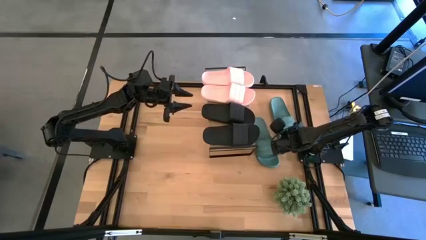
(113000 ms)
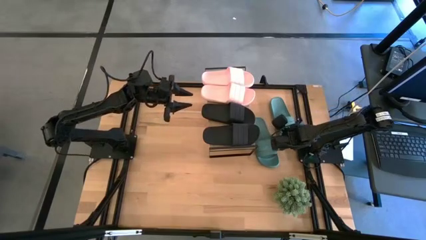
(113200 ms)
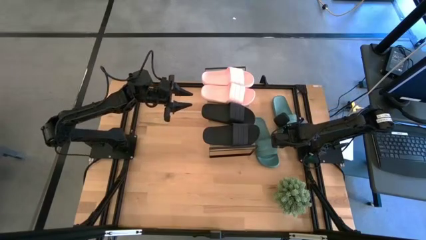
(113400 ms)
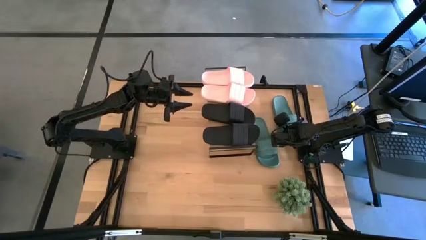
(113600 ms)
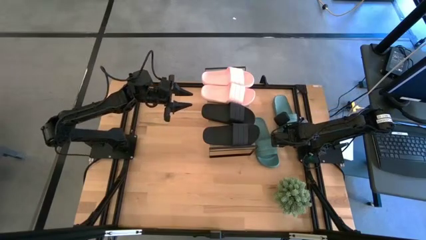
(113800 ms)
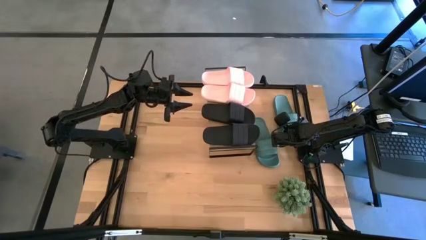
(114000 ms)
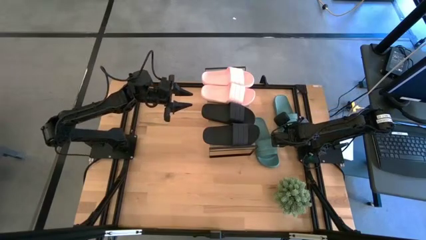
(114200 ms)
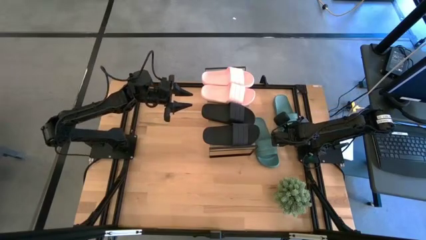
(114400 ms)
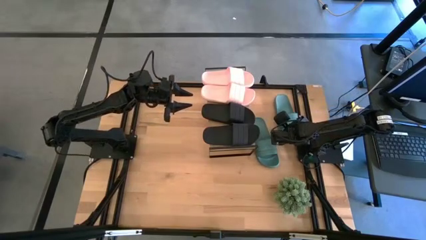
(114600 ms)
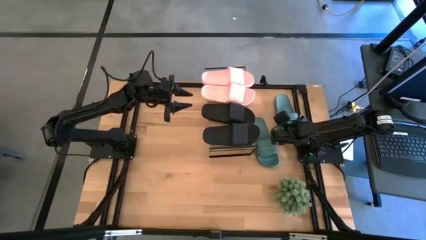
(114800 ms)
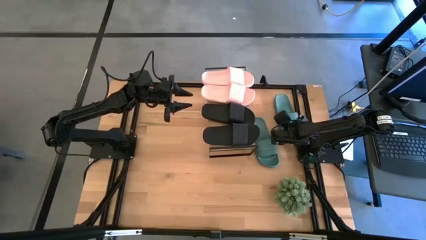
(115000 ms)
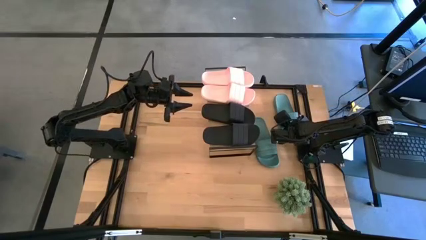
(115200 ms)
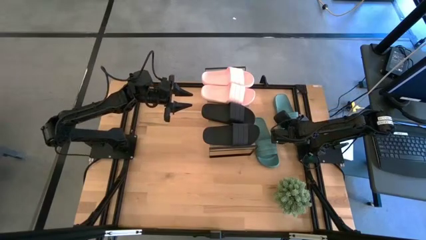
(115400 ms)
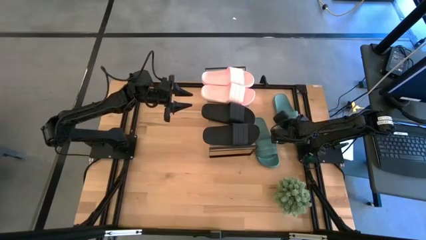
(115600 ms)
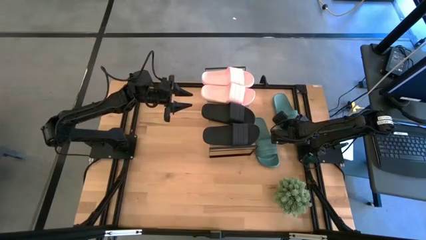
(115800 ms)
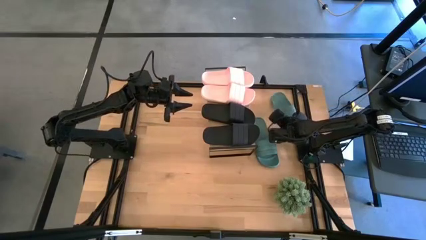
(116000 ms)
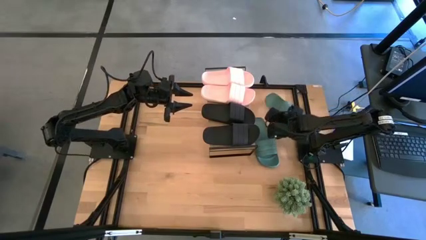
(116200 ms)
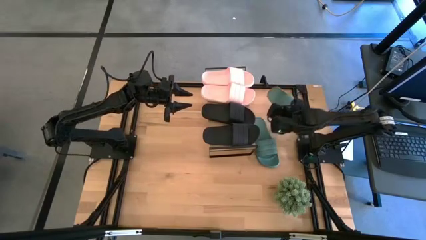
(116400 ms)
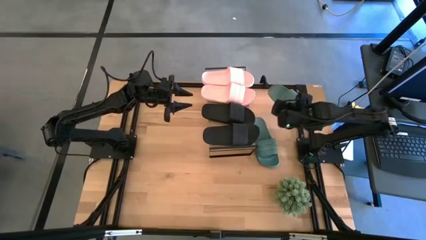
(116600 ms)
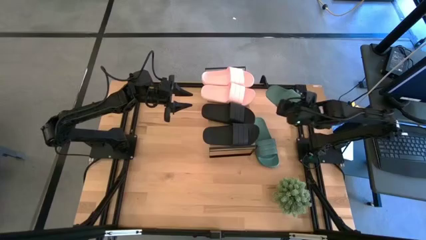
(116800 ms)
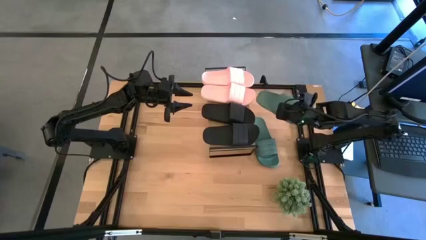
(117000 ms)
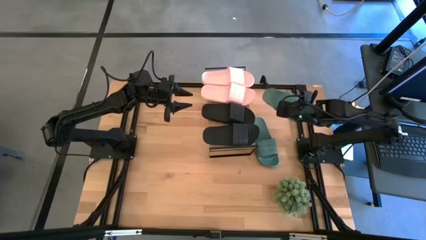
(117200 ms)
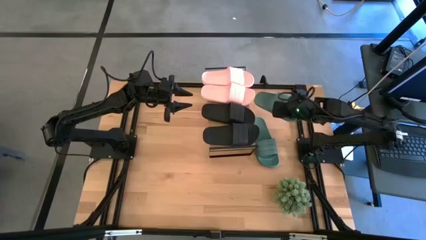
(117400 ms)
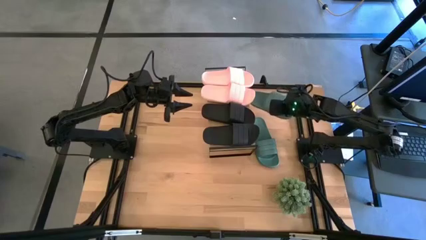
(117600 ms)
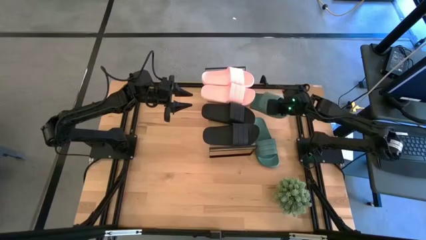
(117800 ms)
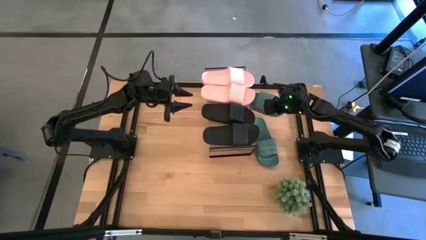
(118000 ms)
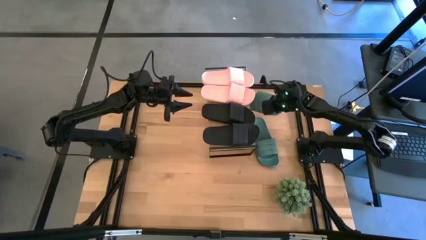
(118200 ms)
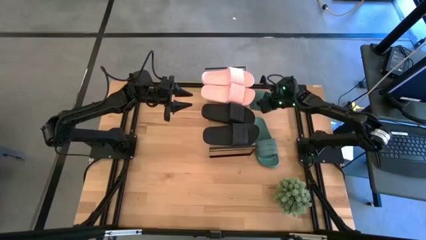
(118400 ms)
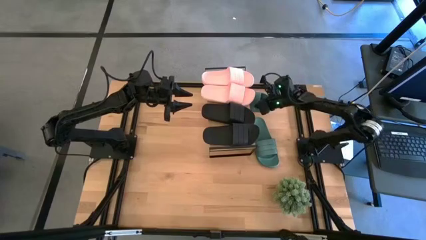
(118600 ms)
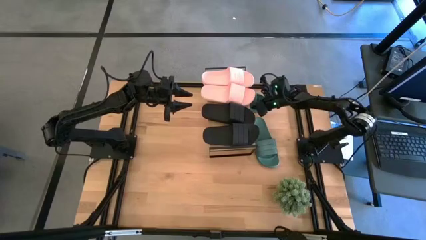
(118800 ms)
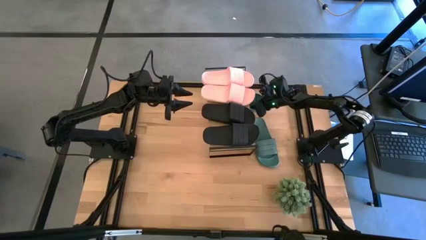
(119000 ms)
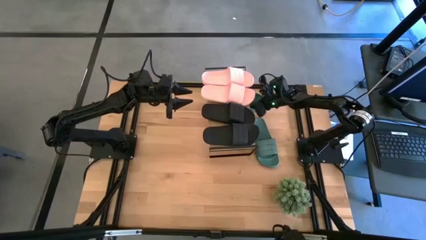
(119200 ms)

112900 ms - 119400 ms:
Task: Pick and place slides into the shelf
Put the right green slide under the shelf

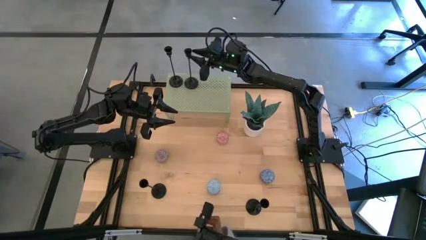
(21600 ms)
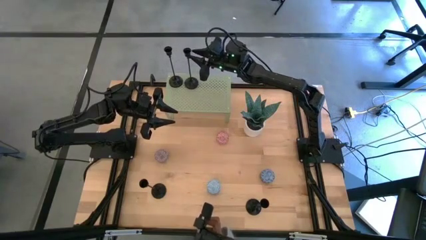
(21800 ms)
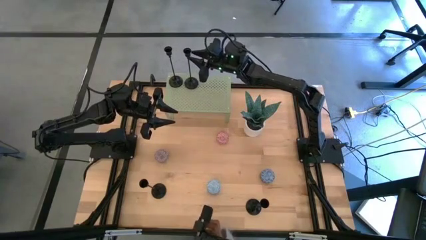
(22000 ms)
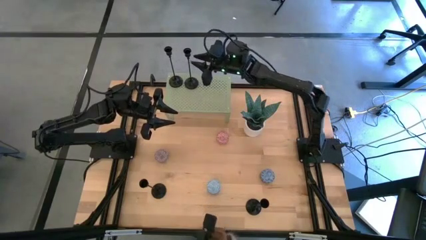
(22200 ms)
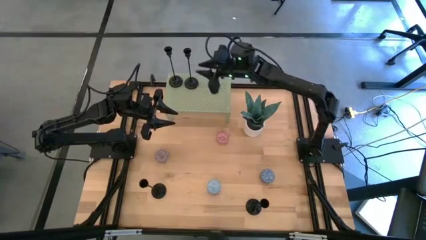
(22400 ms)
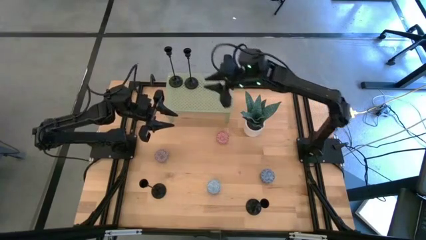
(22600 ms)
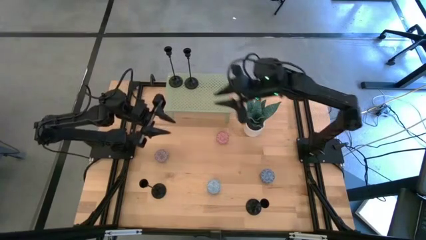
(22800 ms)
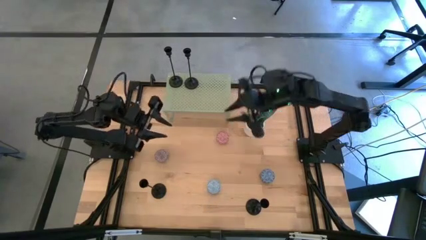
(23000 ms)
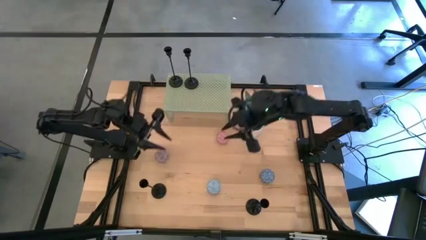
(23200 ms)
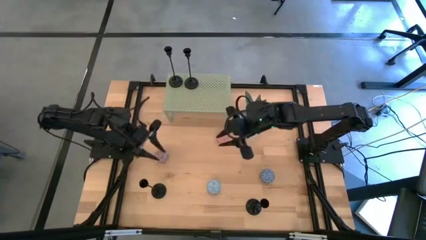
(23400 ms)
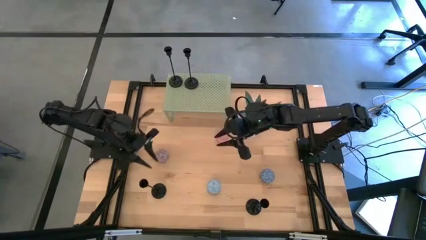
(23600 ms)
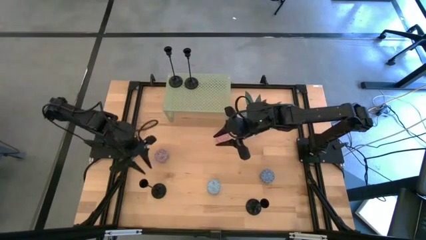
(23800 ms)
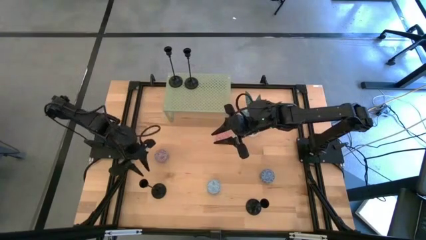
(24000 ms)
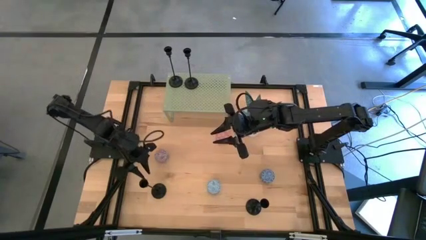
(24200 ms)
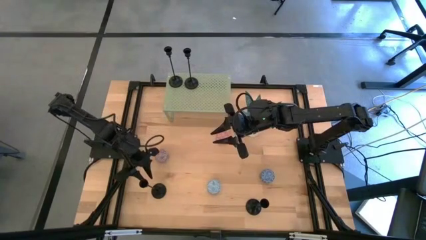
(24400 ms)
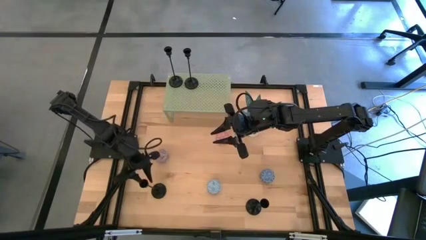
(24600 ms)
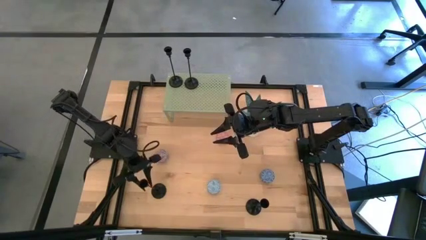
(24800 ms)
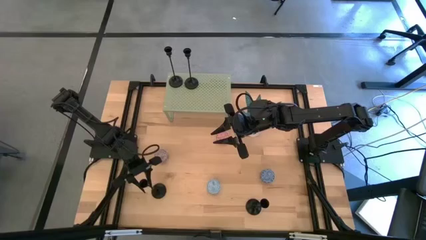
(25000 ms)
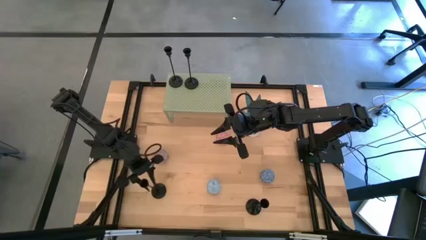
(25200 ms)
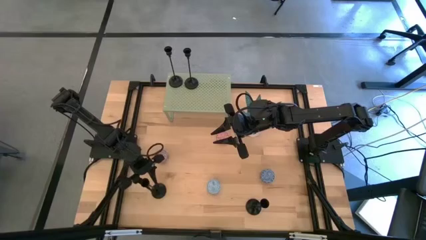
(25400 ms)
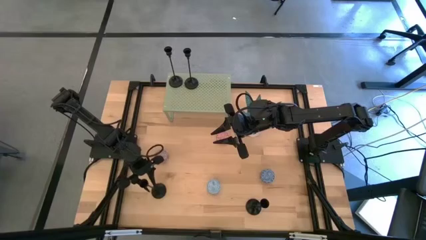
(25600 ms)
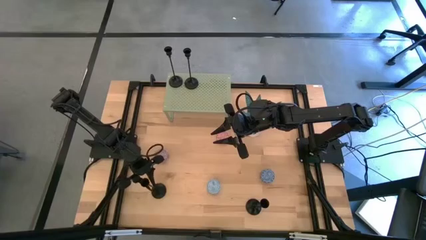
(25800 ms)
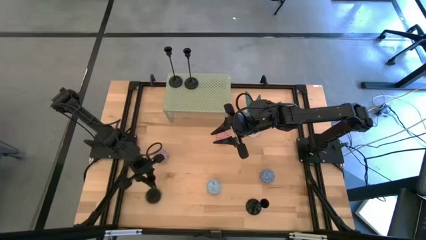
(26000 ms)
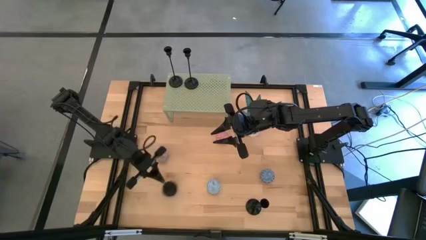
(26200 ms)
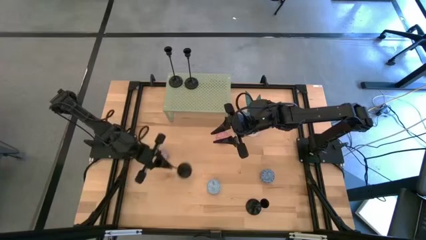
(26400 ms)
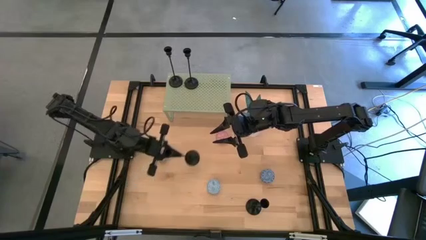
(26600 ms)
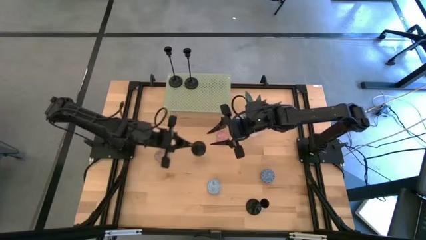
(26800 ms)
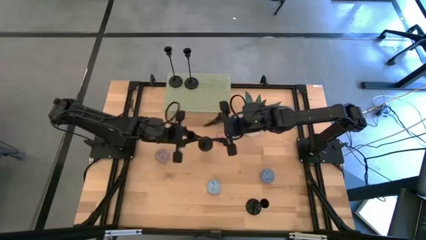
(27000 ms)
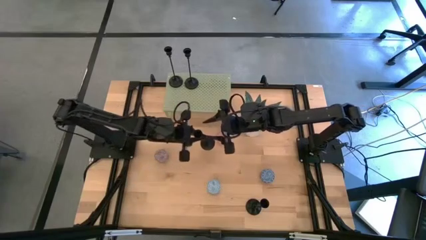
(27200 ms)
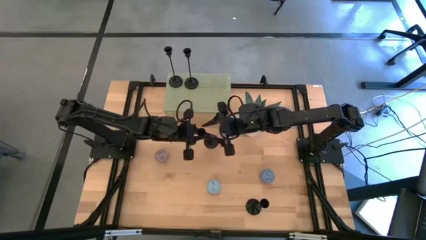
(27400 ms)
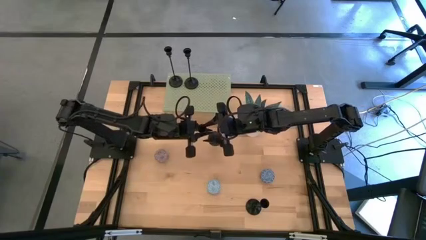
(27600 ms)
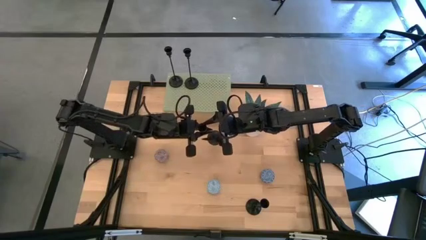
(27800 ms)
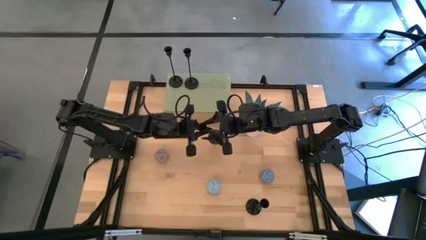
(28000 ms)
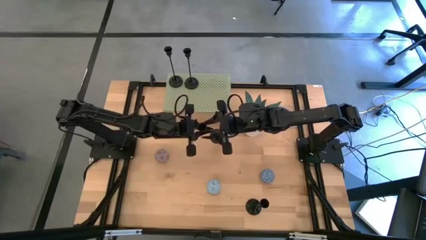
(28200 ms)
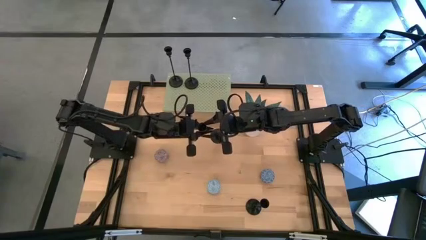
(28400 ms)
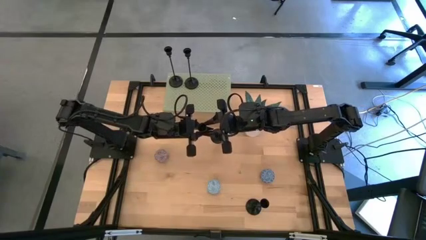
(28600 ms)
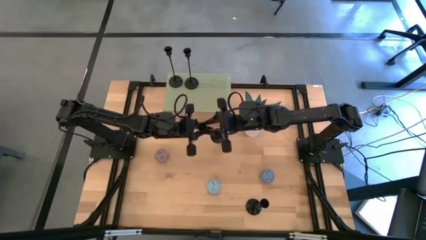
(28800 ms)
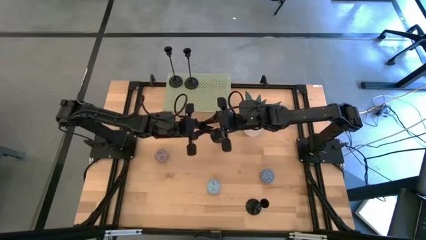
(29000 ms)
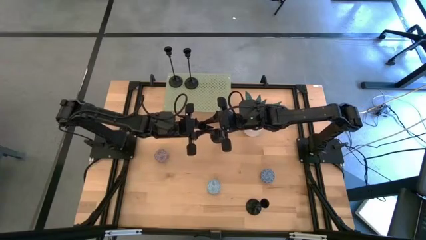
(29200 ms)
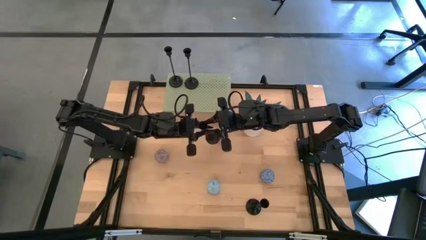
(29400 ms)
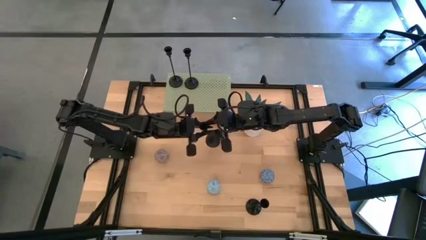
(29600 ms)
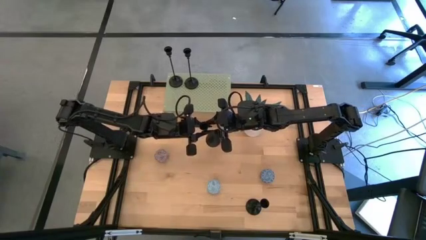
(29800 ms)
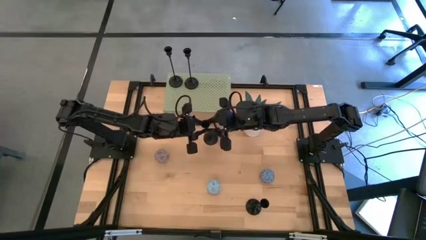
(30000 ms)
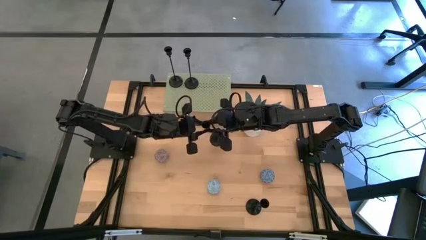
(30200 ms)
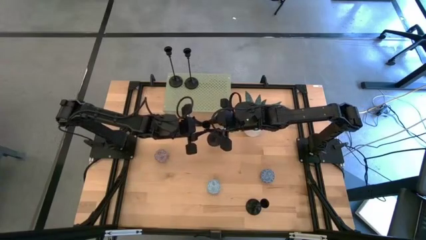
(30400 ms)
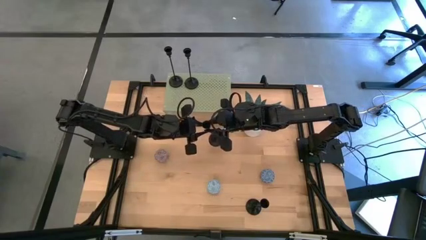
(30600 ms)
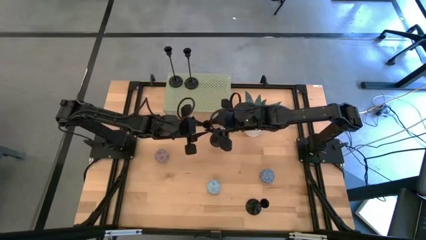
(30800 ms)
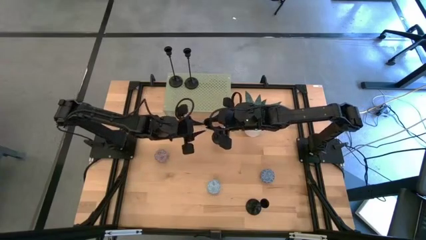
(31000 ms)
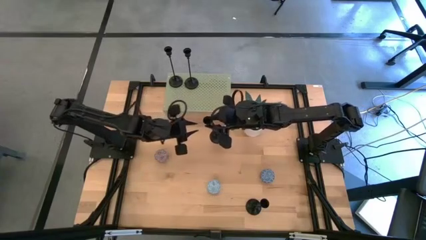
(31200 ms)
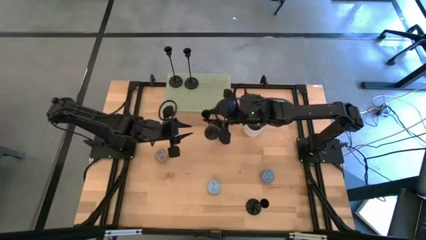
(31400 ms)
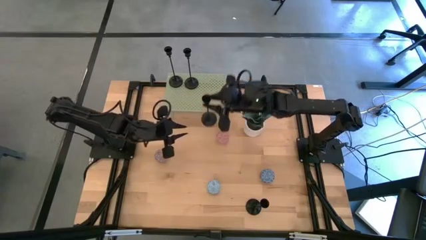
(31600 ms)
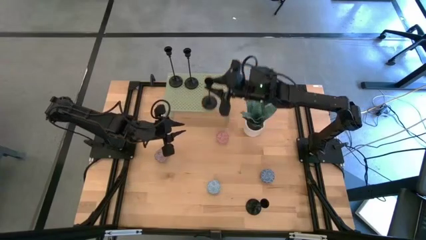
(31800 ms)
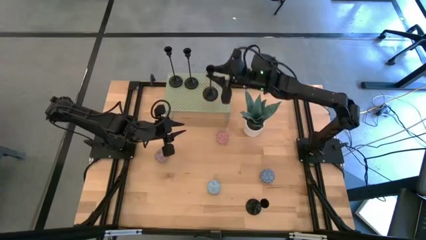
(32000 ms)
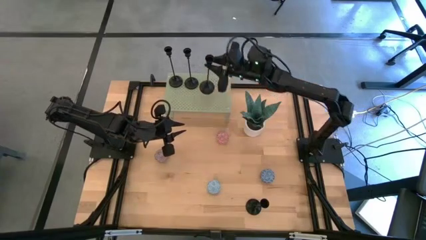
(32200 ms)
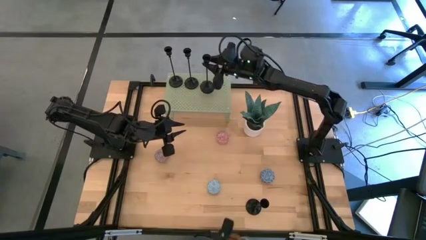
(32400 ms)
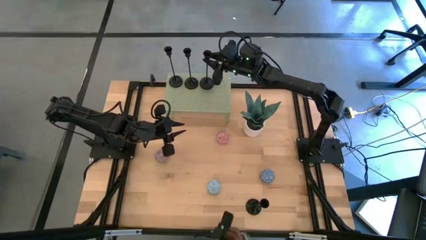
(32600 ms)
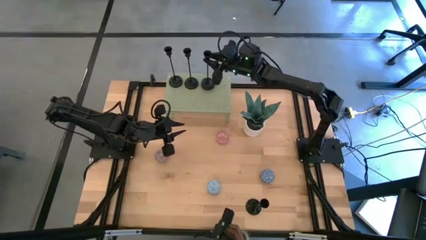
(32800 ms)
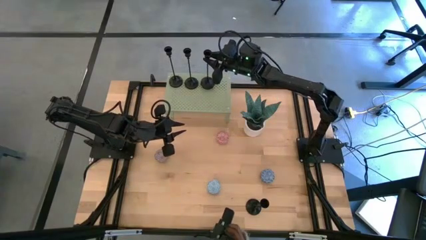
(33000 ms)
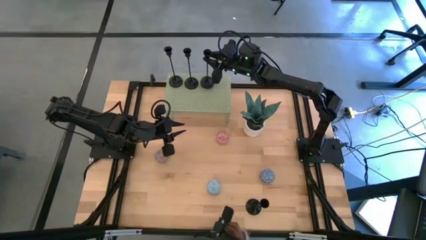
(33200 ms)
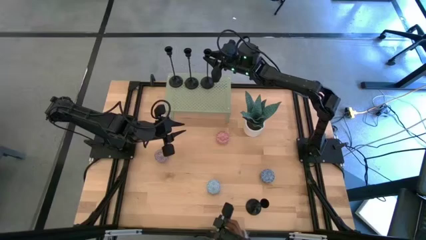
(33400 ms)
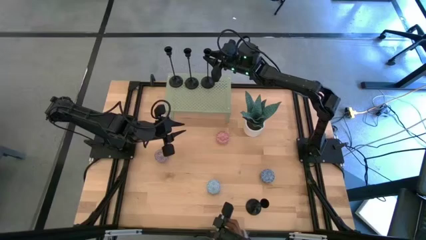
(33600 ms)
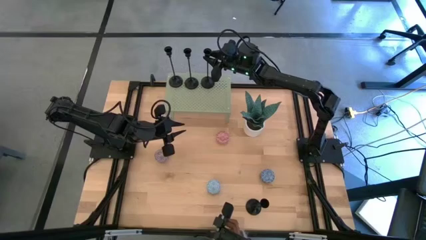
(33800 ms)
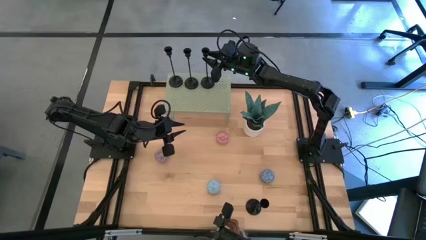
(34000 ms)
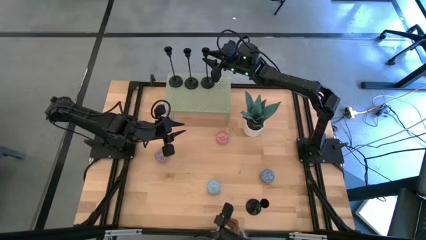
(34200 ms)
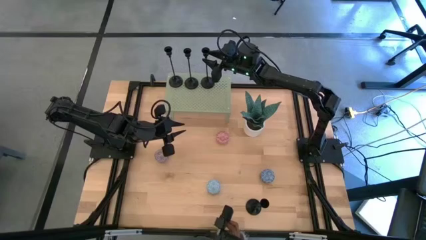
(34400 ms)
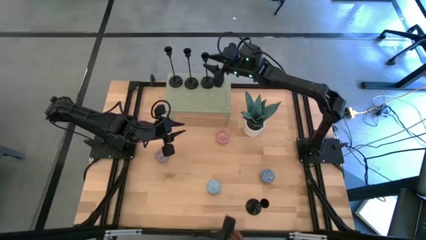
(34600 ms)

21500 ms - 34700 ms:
Task: Pick & Place candle stick holders
Align the black candle holder with the other black candle holder on the shelf
